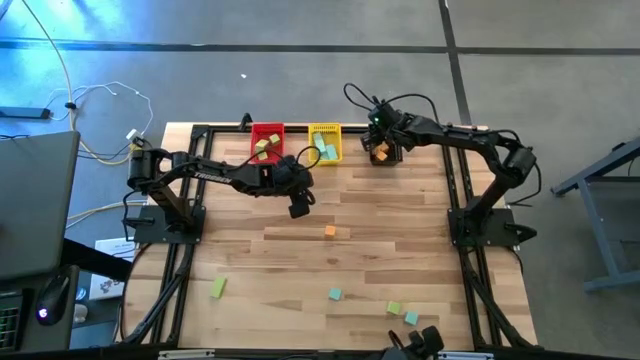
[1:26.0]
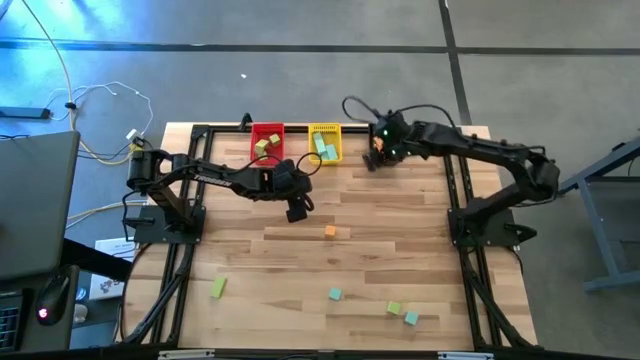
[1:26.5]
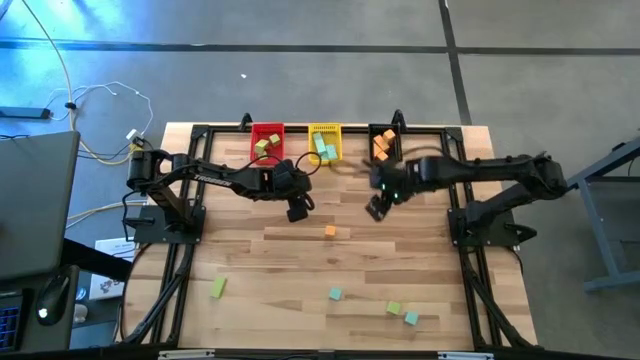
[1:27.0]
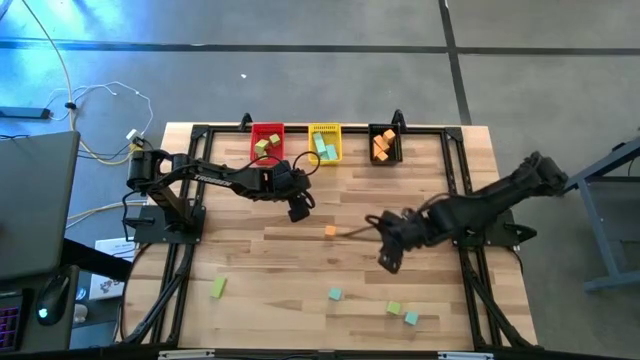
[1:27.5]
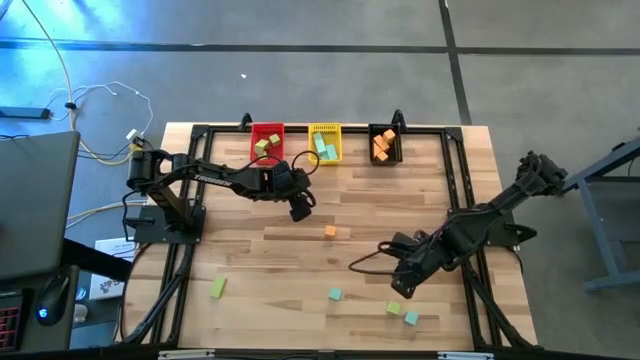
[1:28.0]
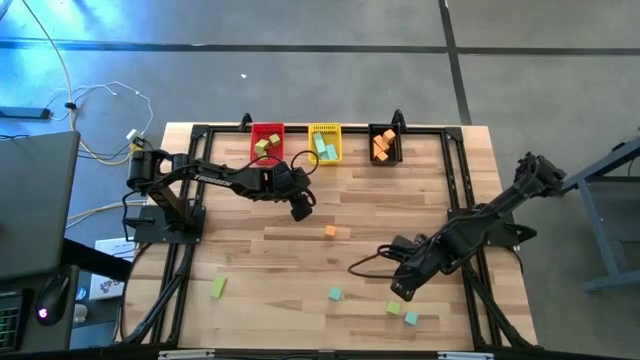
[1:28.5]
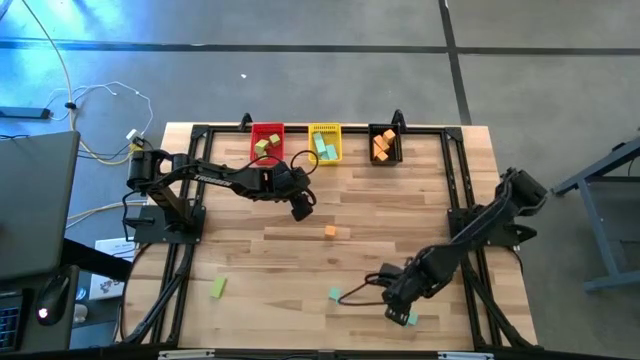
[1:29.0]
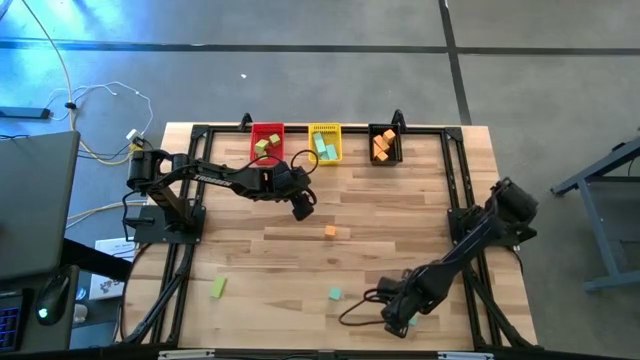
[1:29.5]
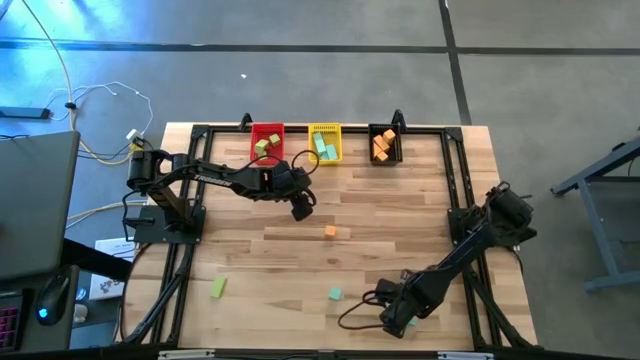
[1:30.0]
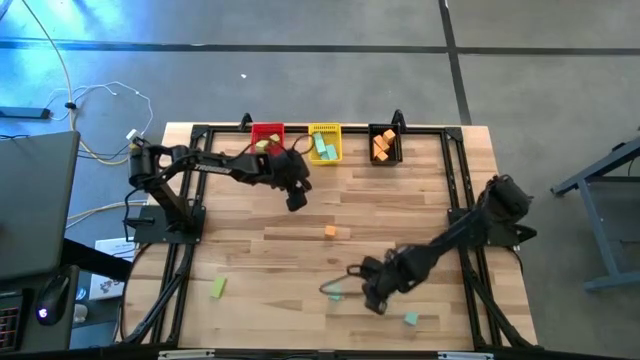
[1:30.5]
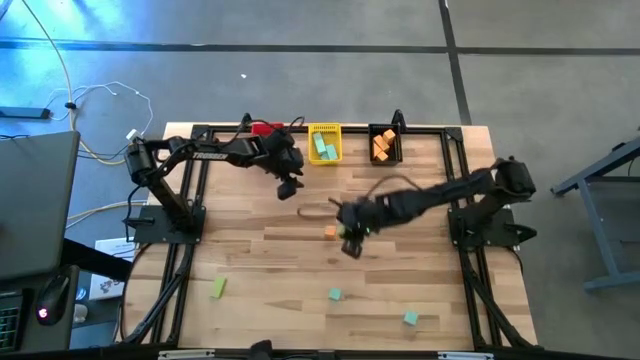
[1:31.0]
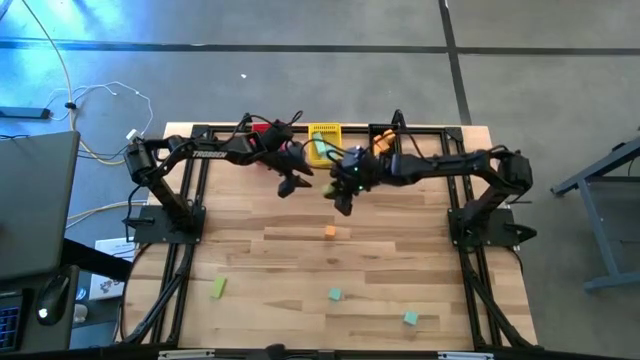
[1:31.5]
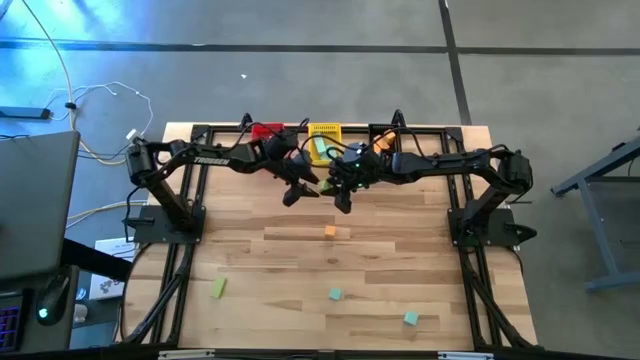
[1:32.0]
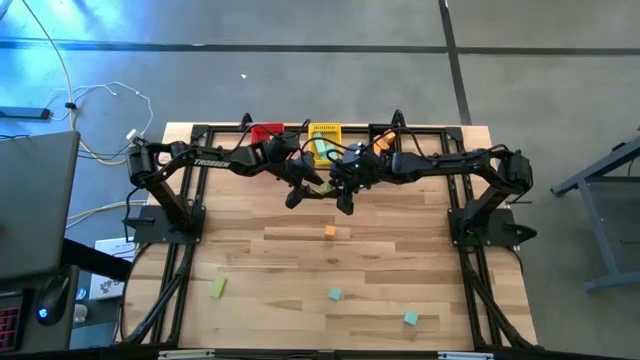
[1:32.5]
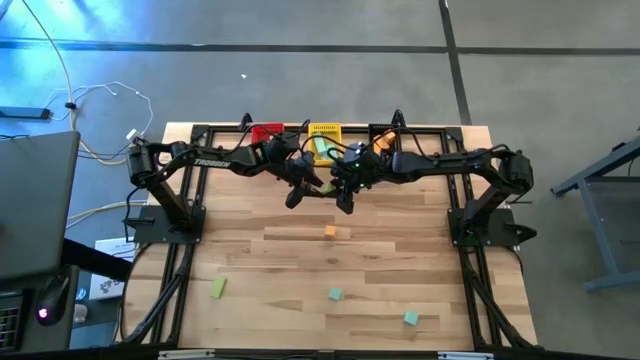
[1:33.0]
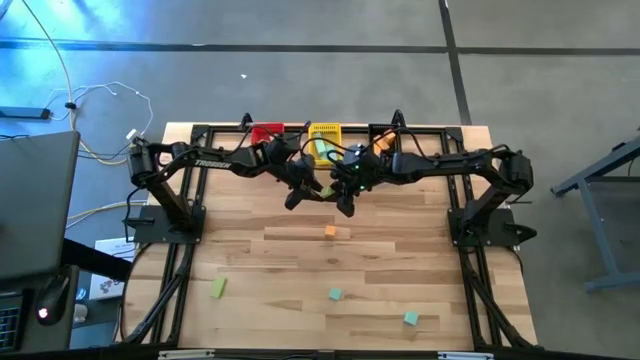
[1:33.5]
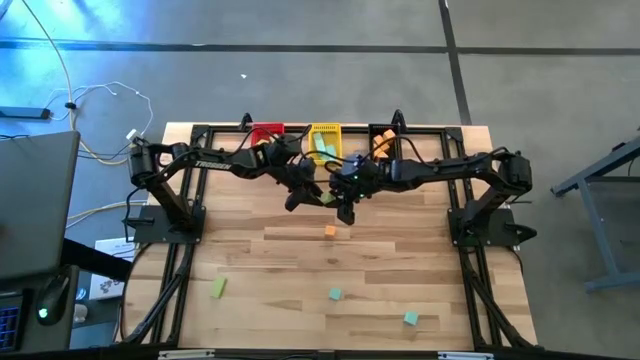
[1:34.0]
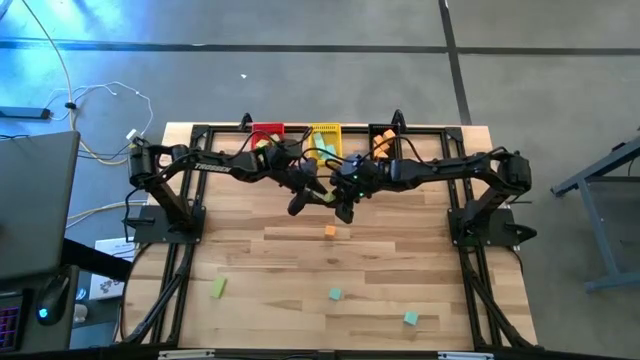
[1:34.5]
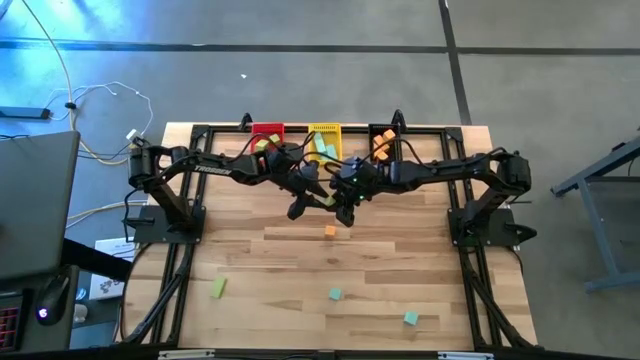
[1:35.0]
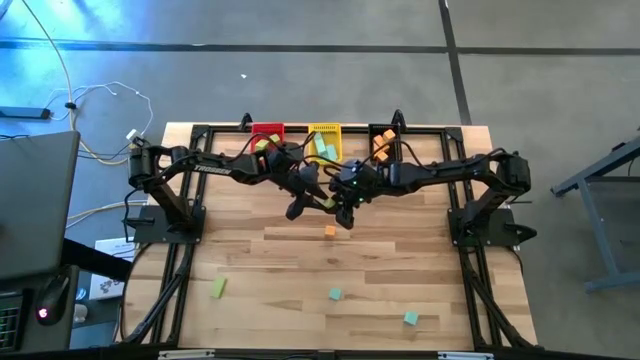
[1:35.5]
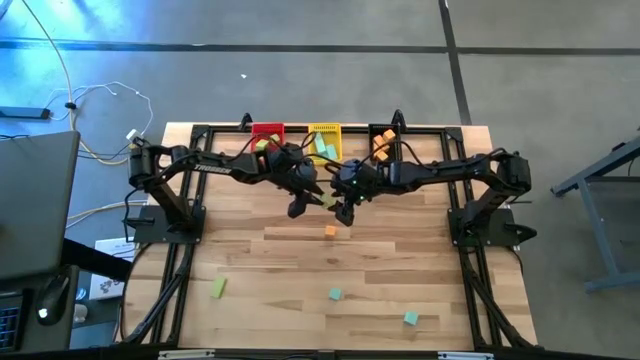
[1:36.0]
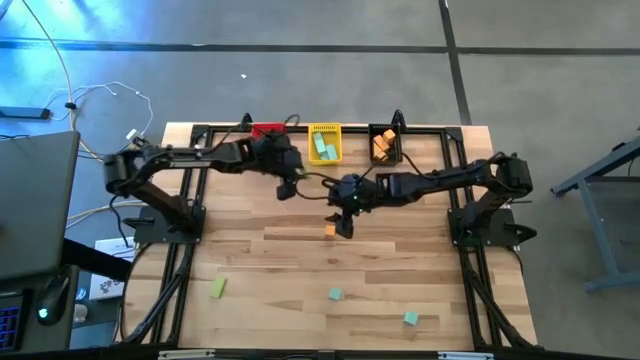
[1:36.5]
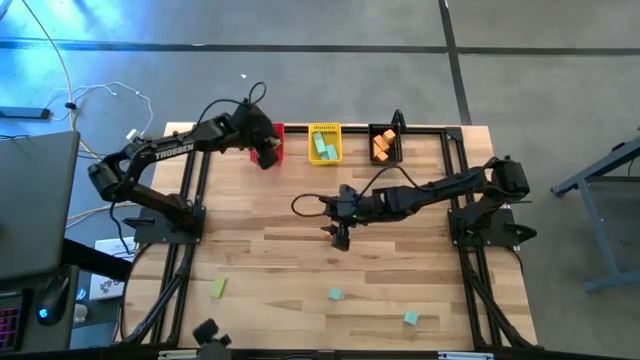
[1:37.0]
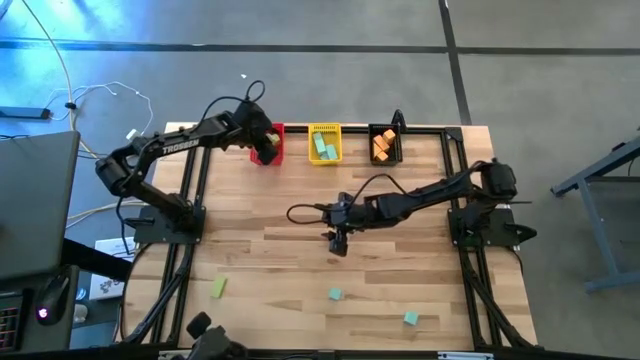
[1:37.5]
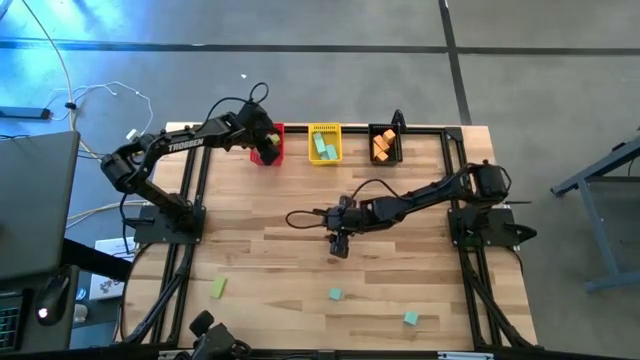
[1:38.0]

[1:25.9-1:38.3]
Task: Sort & place blocks by color
Put the green block into the red basket

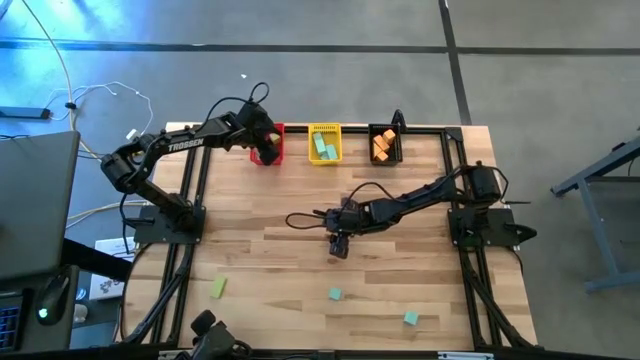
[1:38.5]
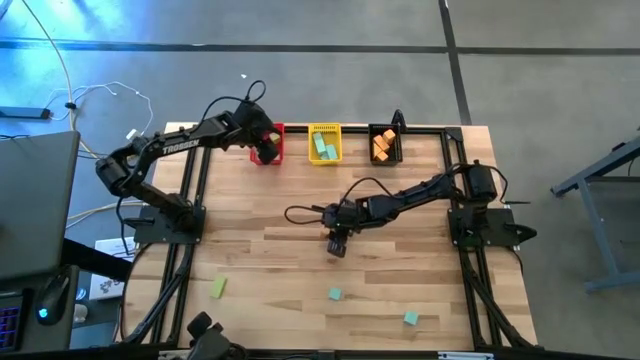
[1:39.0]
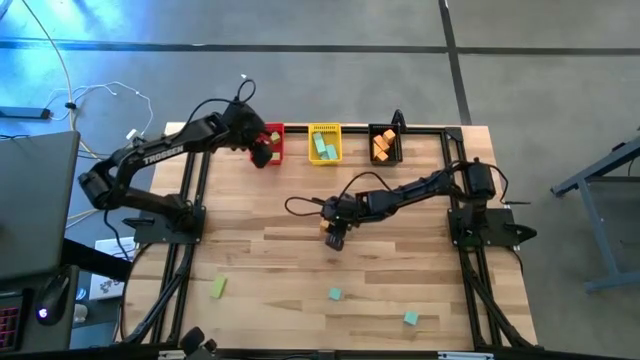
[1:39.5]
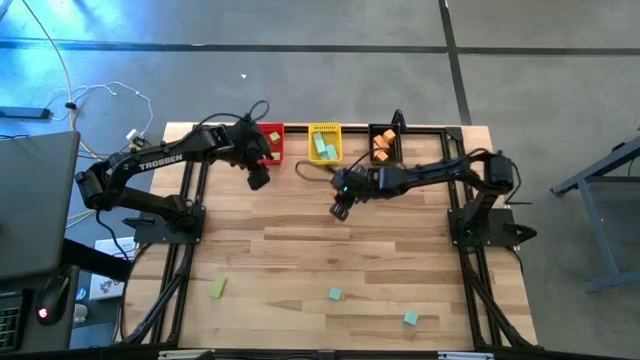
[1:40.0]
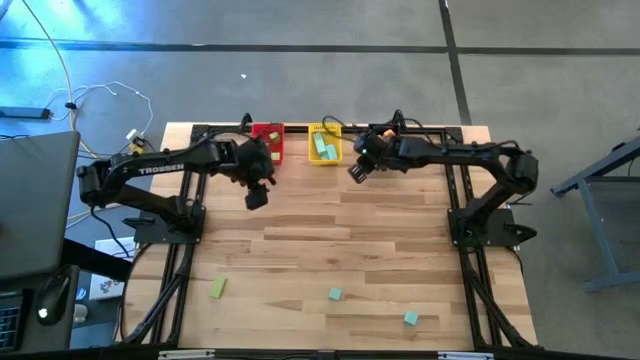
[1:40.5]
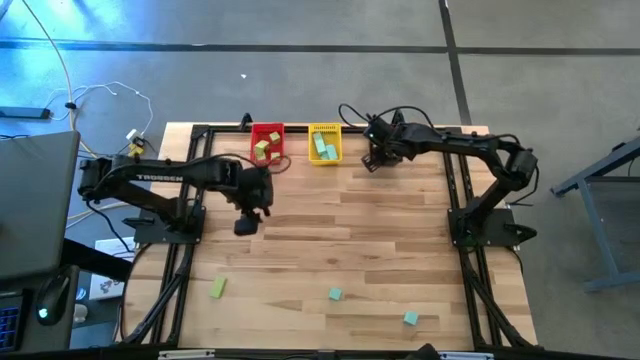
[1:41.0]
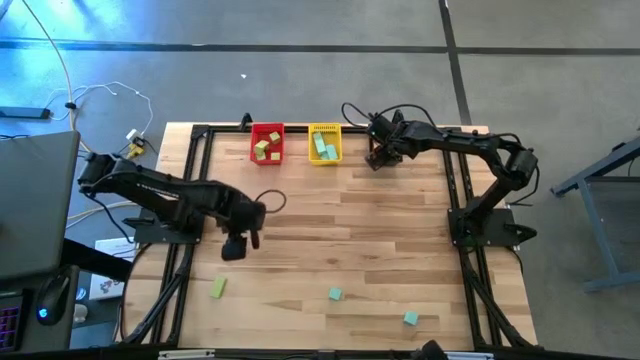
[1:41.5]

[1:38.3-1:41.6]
Put the orange block into the black basket

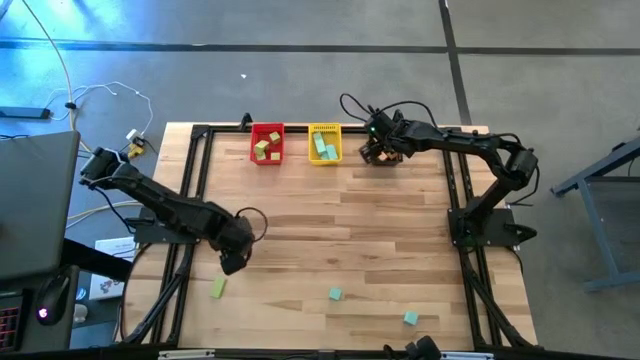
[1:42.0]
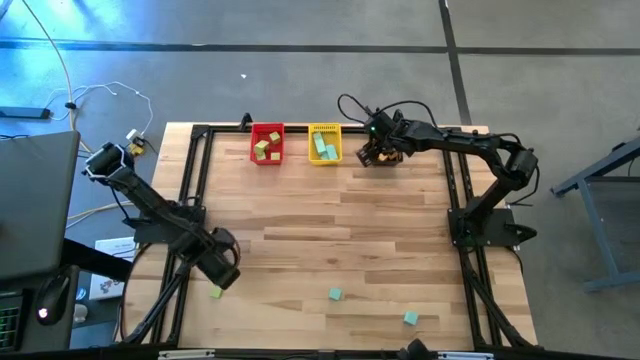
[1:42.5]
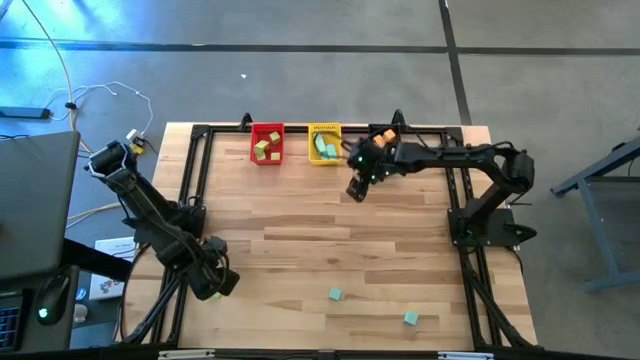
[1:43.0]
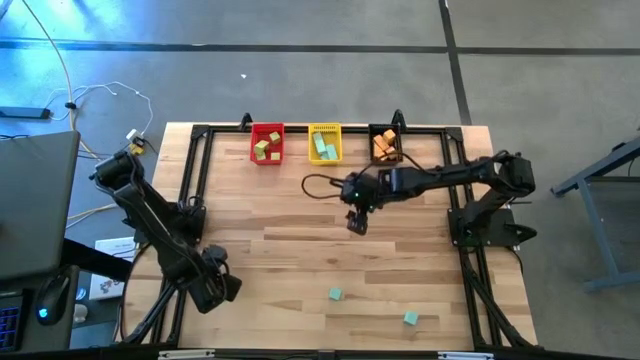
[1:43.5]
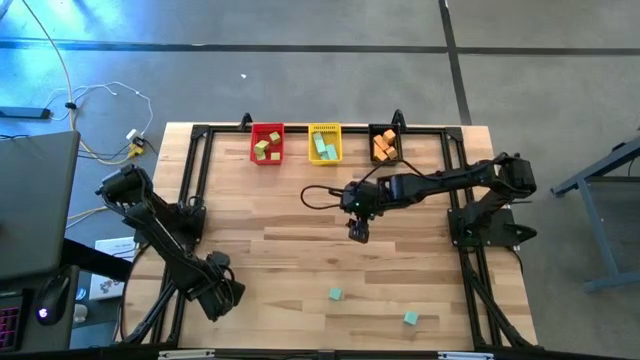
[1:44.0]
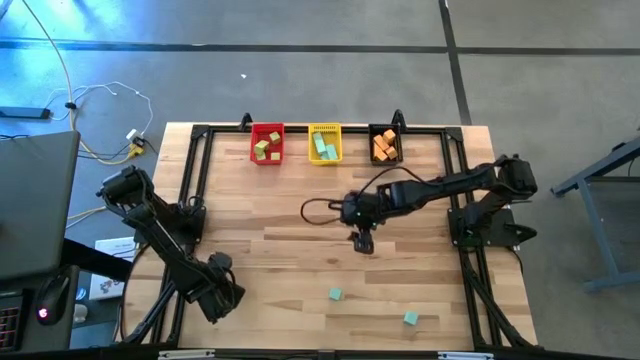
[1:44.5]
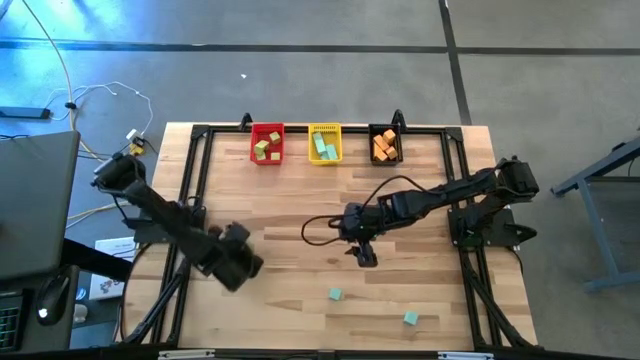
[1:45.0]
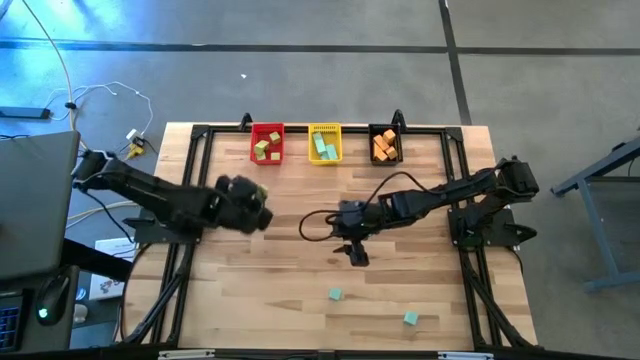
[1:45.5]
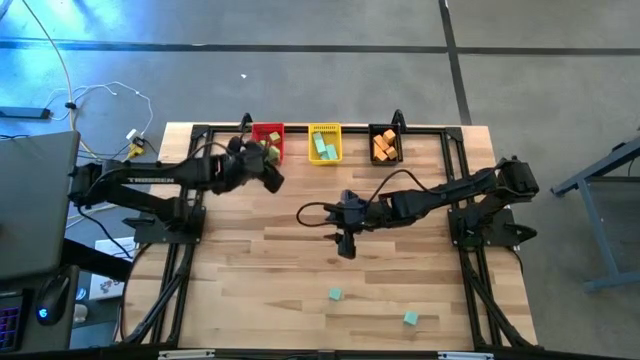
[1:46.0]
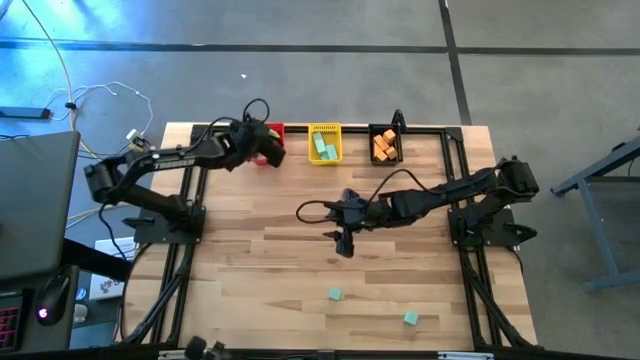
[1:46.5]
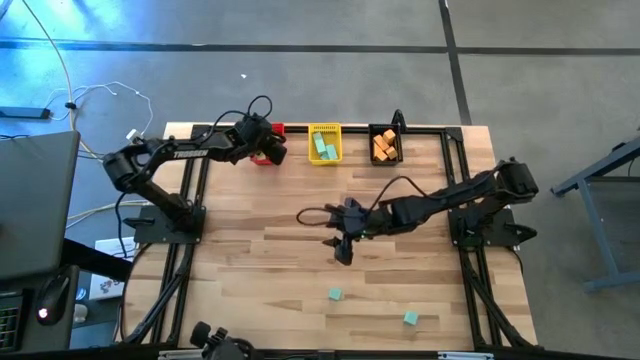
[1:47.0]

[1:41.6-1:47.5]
Put the green block into the red basket
